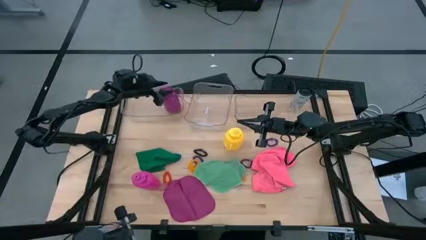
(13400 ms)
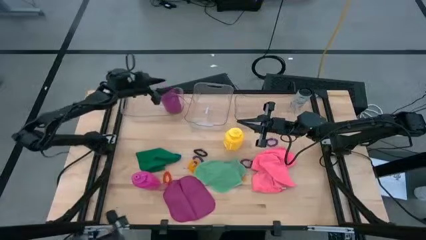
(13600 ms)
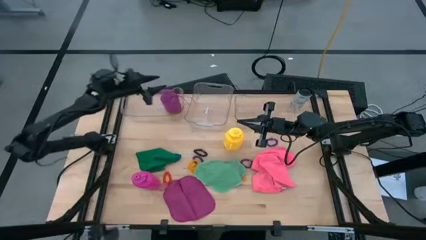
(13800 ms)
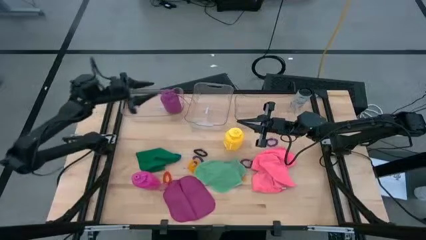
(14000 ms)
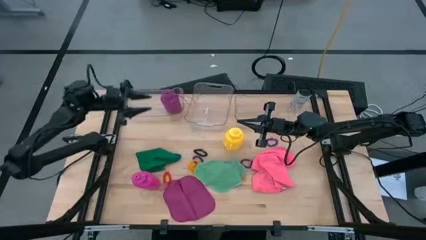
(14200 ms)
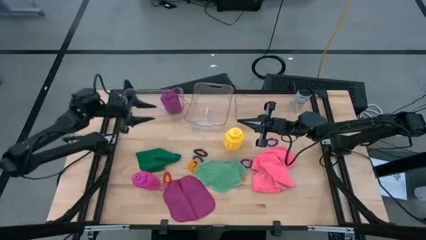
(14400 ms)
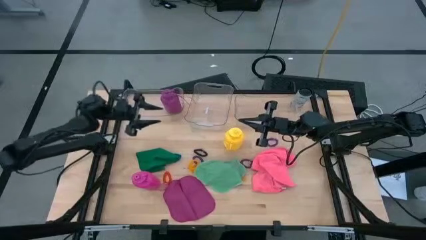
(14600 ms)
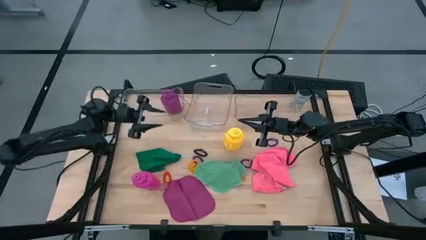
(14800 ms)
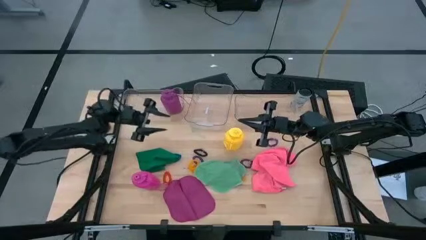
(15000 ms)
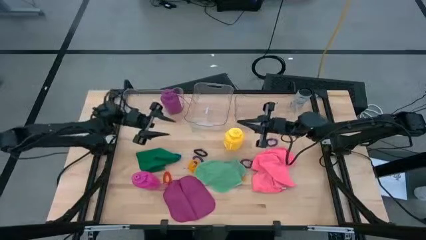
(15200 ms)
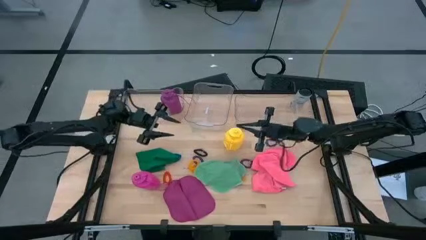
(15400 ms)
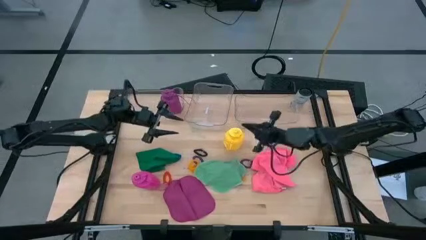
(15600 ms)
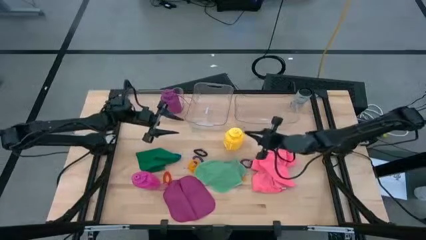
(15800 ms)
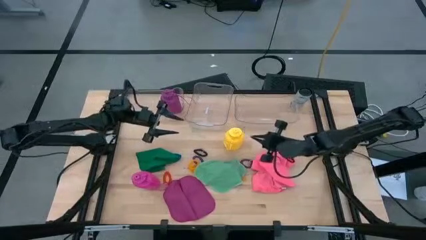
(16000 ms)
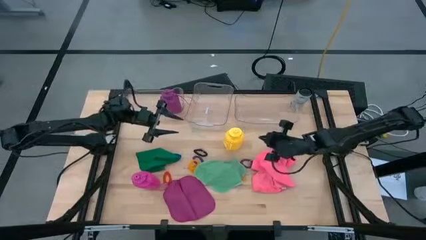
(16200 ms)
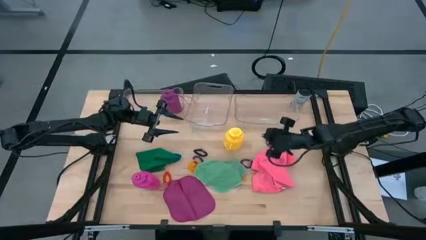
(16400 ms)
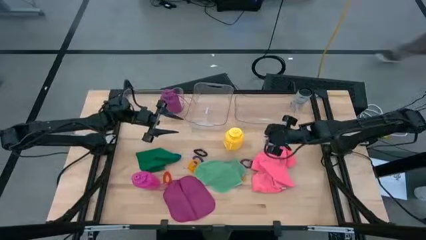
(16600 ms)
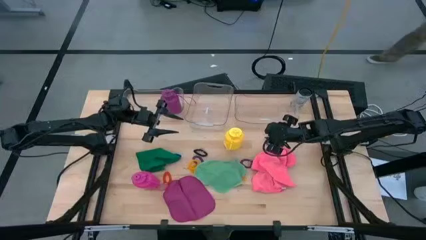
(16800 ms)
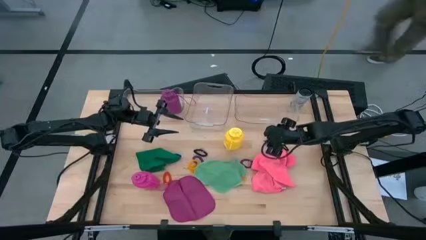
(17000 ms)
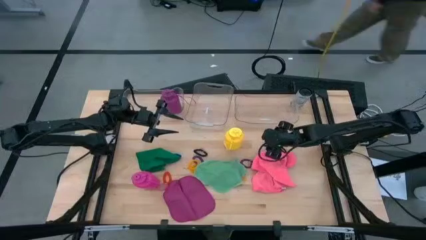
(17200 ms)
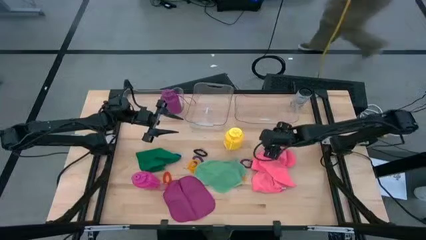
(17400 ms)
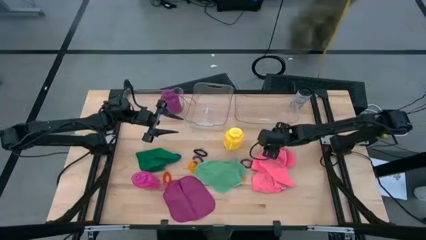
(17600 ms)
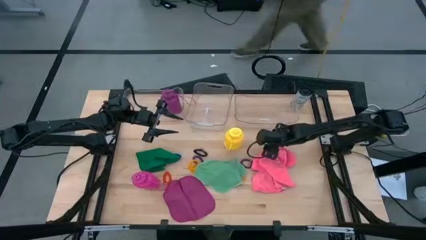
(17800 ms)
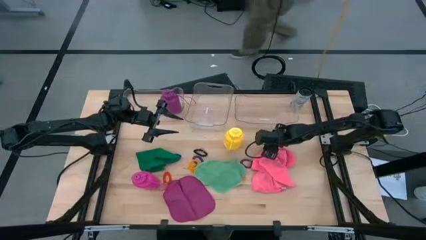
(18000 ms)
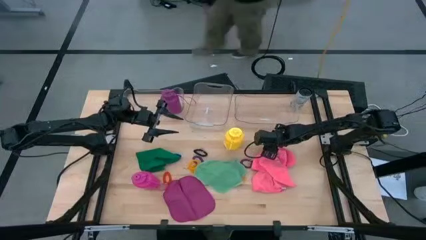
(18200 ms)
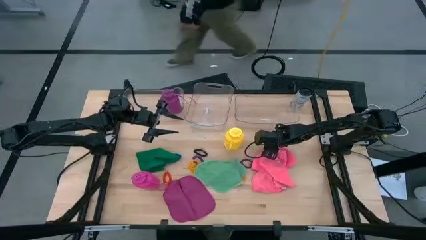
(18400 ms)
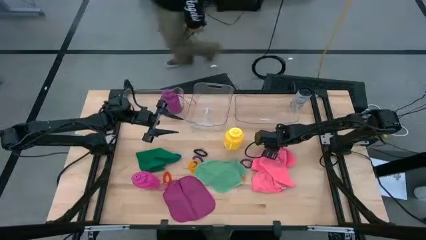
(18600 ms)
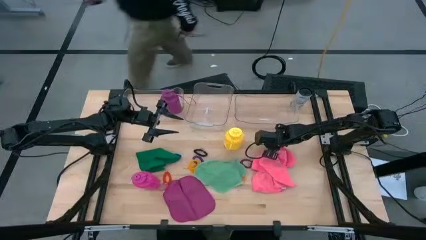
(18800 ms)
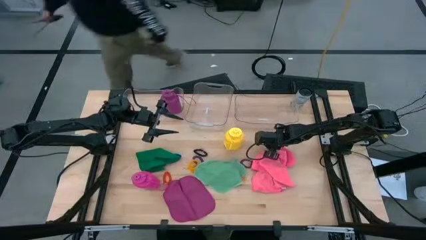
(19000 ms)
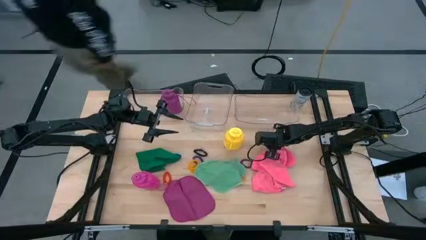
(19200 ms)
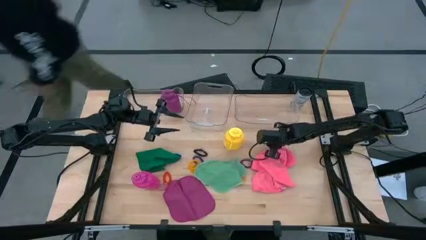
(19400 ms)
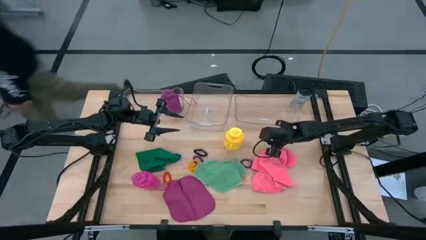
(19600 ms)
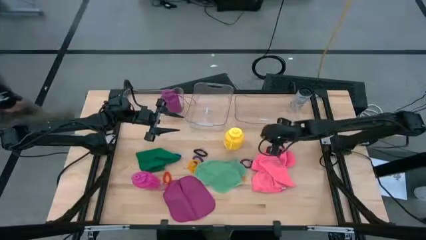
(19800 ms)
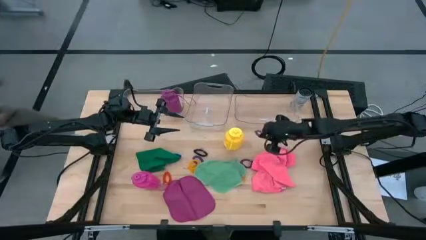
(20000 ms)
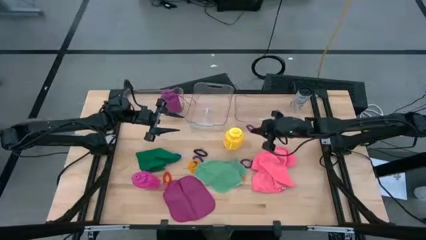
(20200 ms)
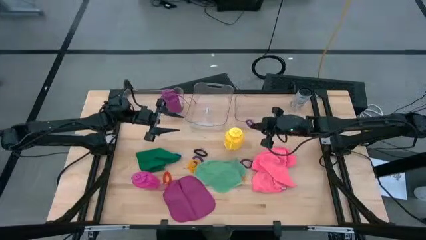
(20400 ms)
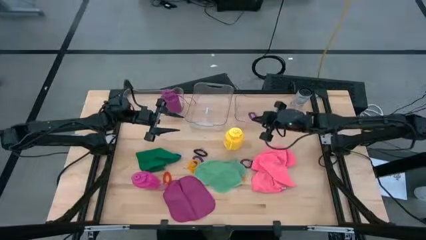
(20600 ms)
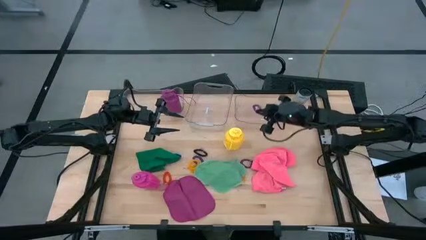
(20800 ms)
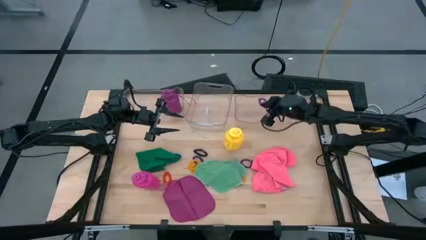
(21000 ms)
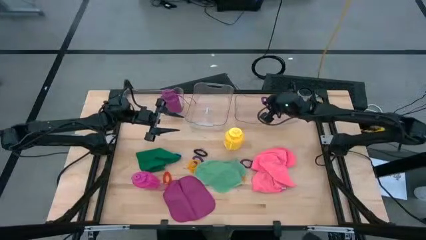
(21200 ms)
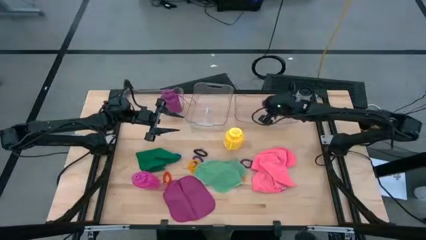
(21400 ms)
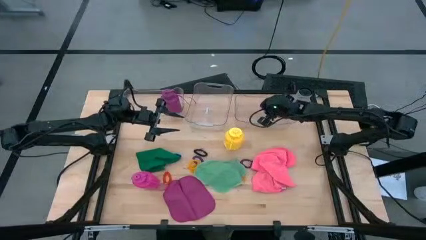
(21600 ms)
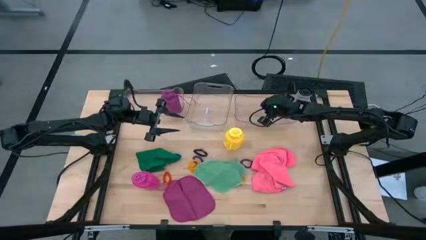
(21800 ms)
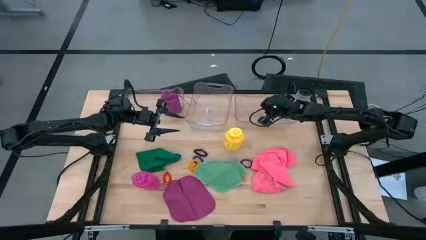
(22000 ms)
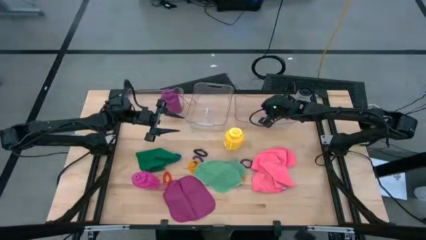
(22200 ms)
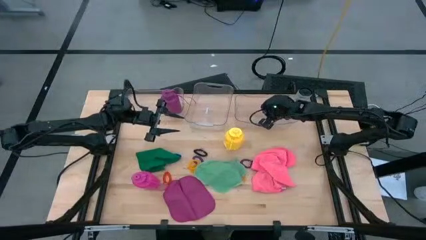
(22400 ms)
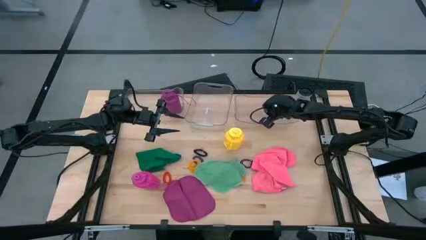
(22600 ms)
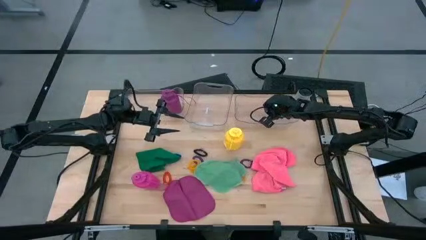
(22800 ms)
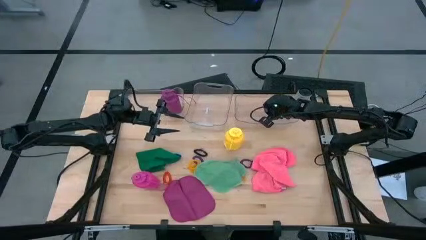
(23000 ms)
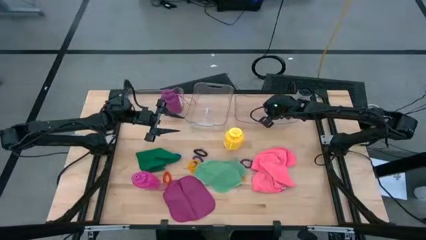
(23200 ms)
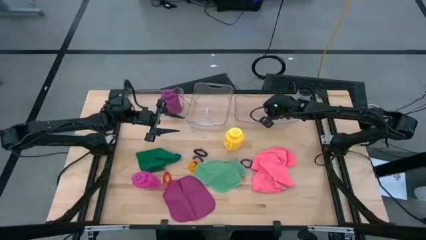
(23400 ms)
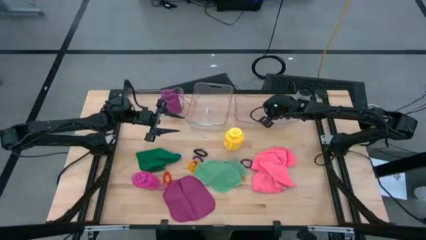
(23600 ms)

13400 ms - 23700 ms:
Task: Pick & Place Sports Items
Put the purple spring keychain into the right transparent bin
